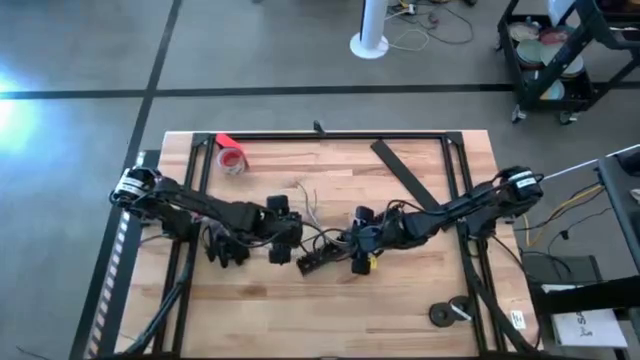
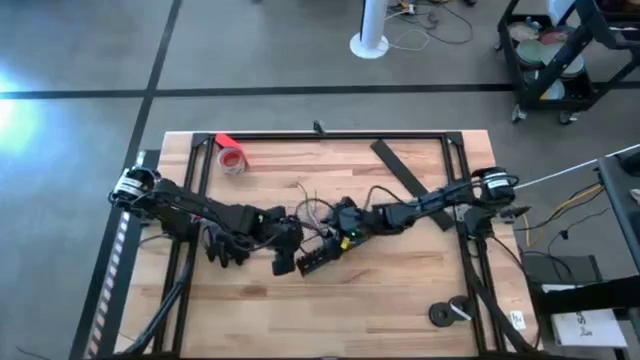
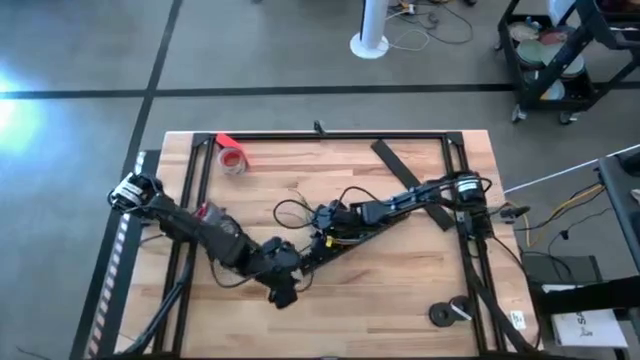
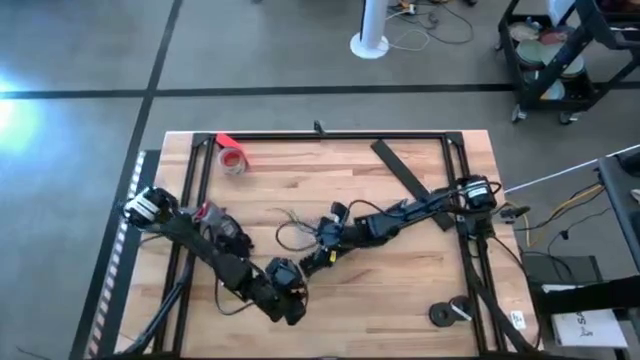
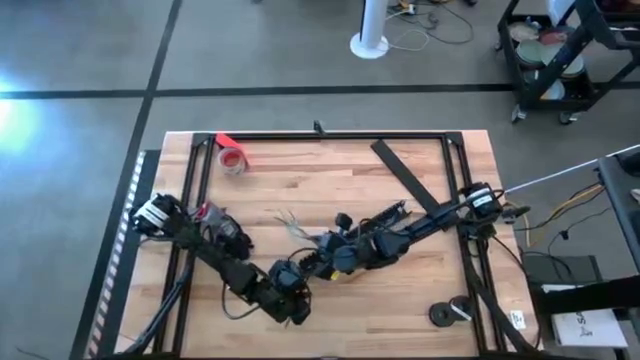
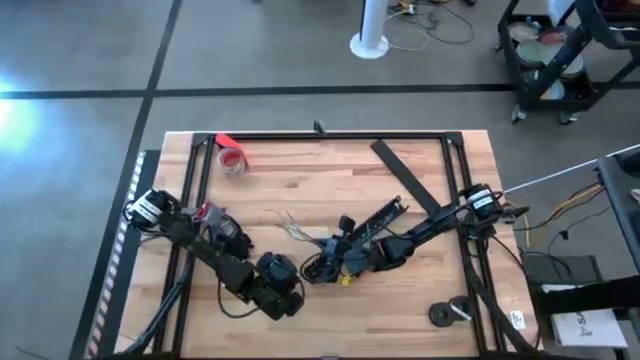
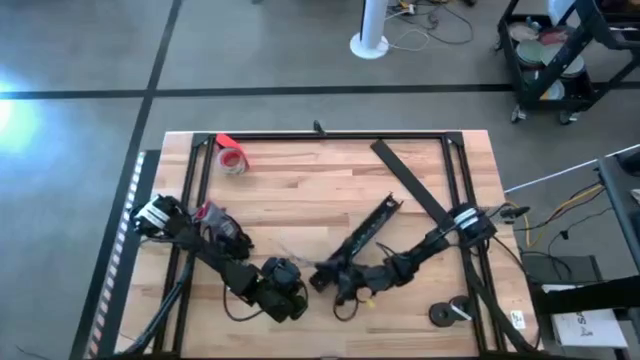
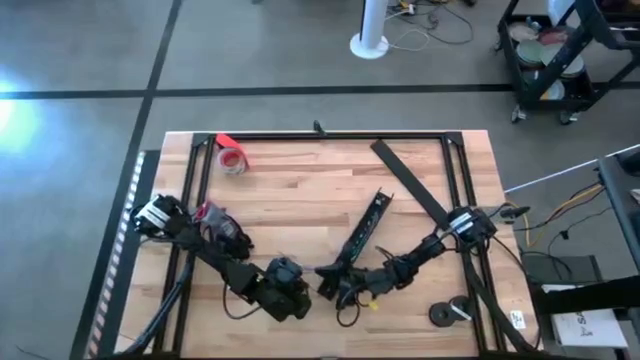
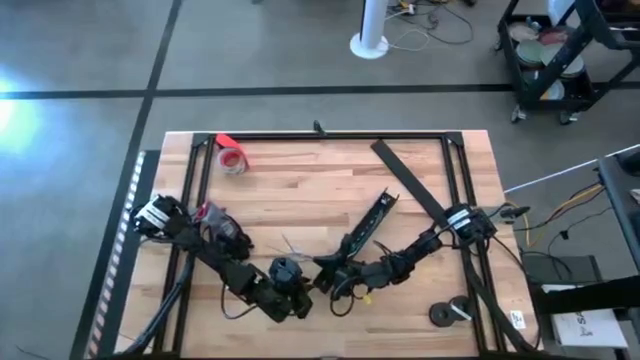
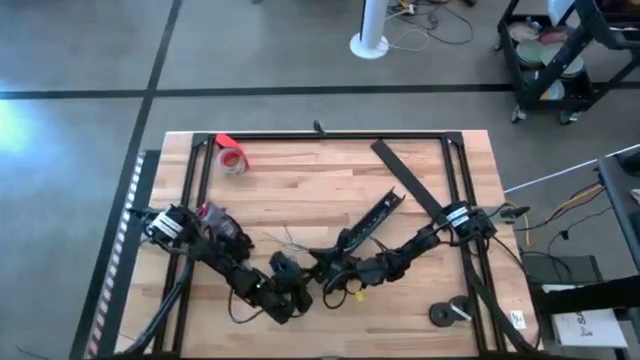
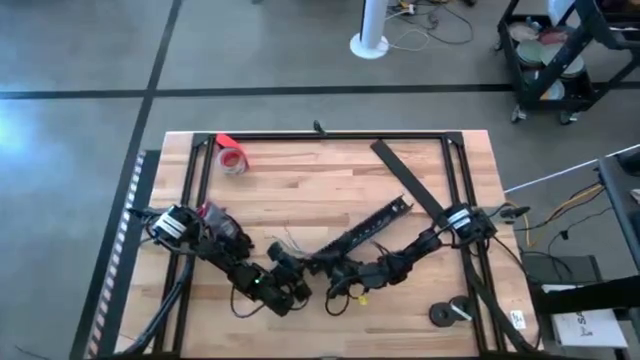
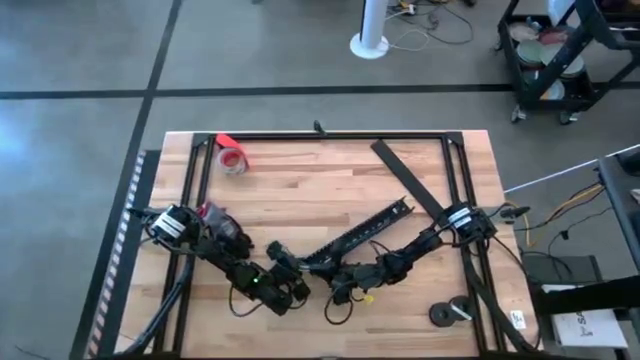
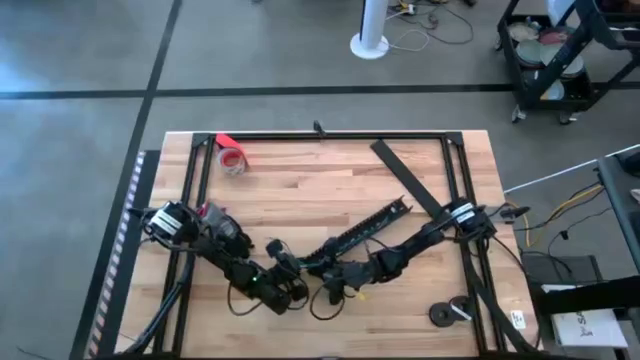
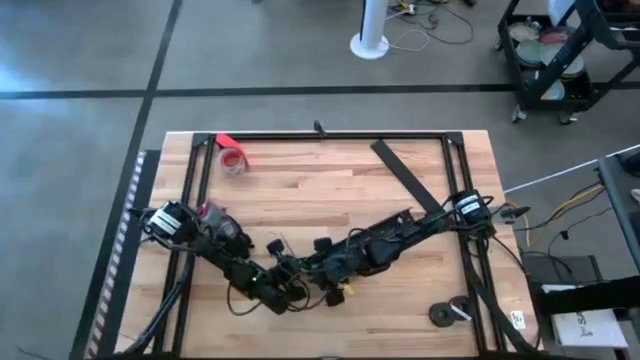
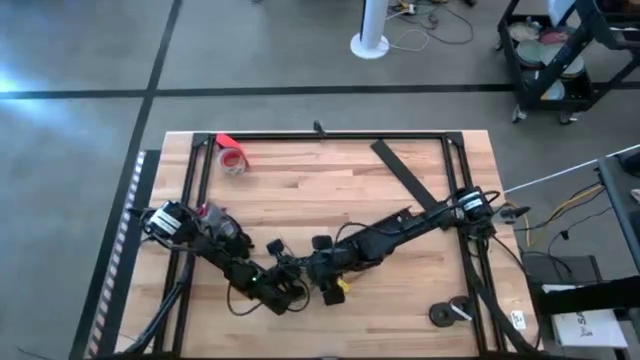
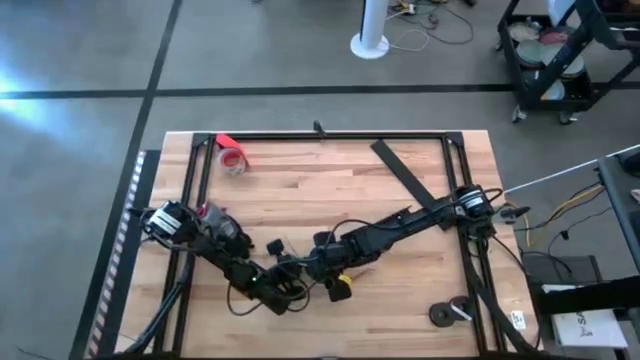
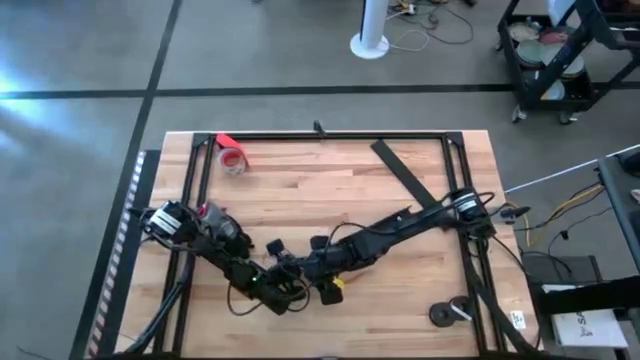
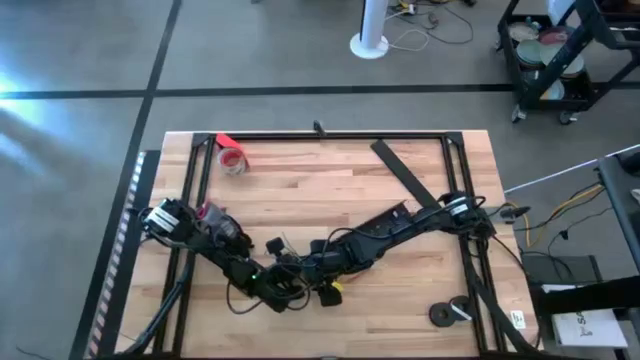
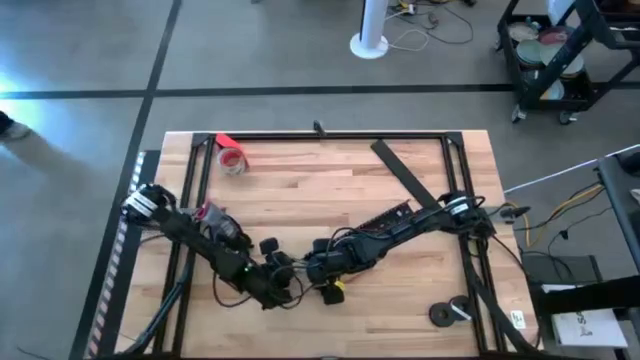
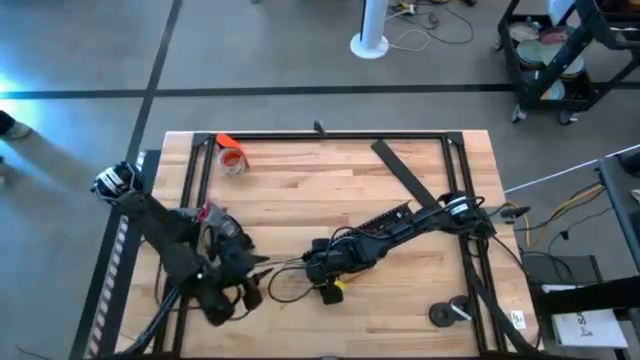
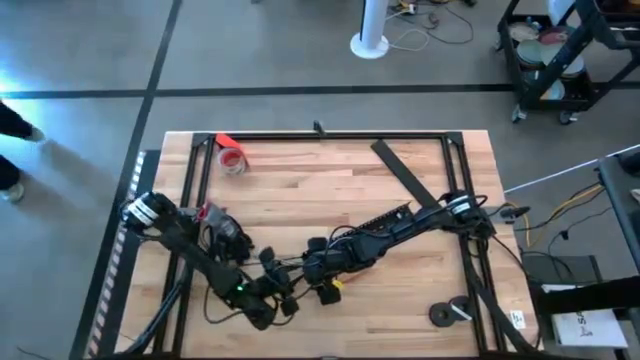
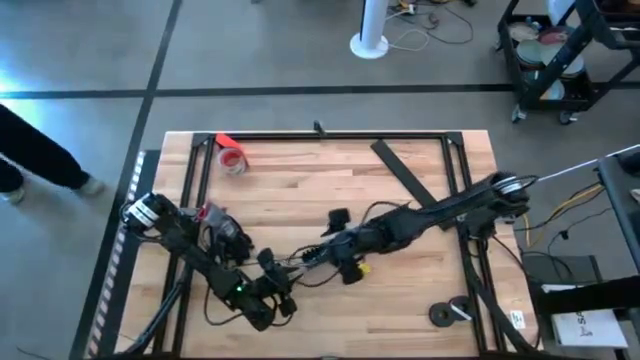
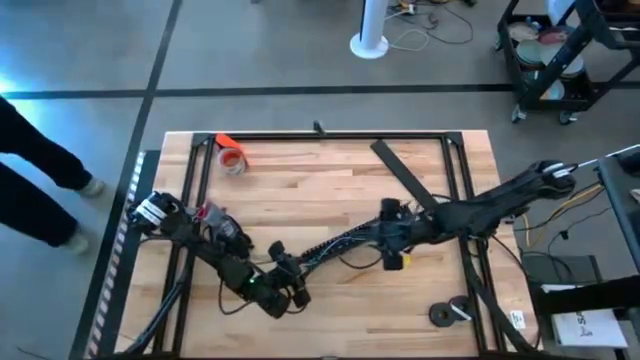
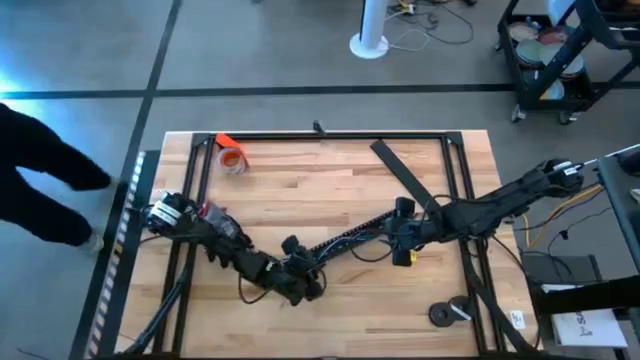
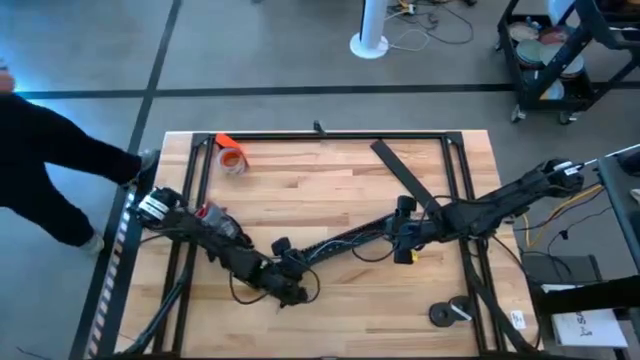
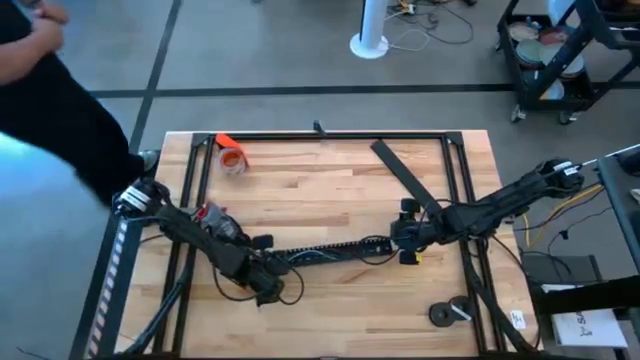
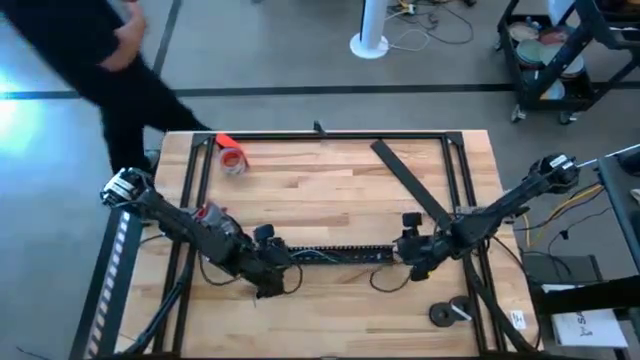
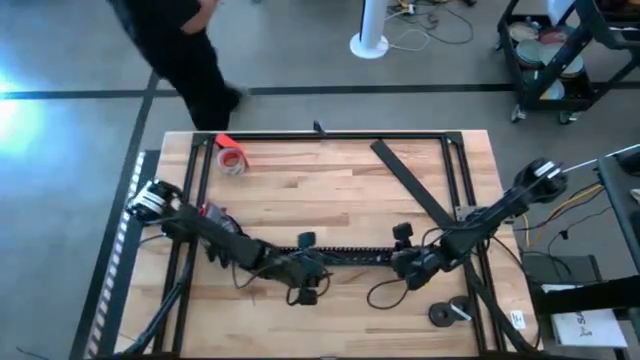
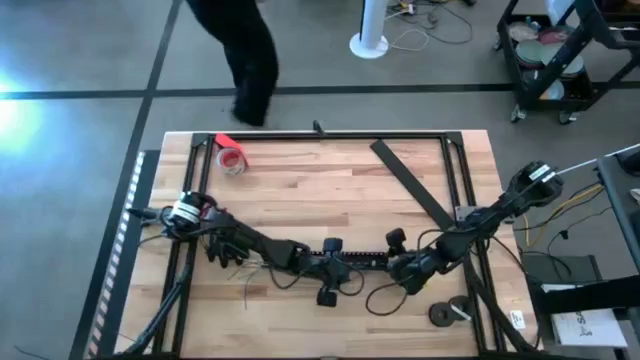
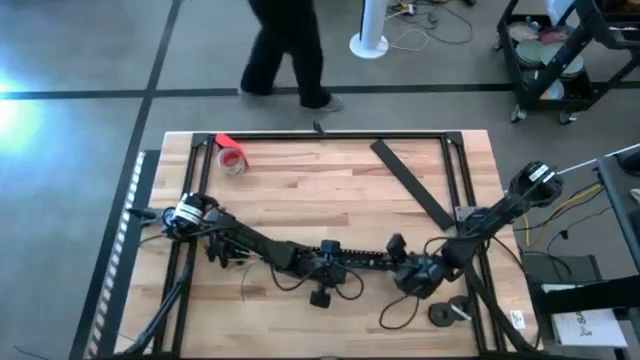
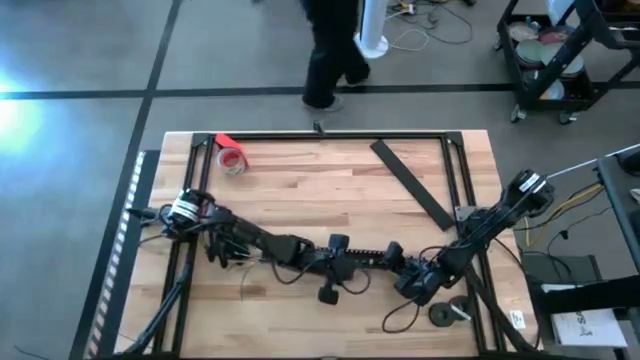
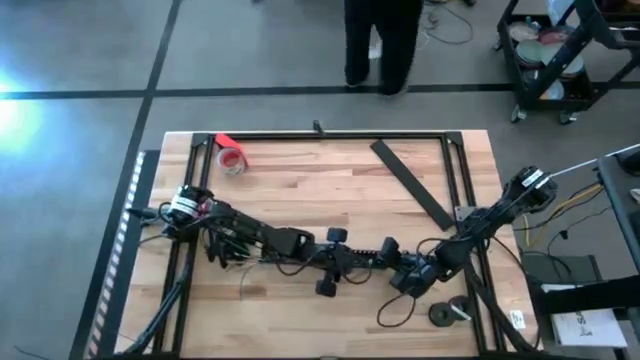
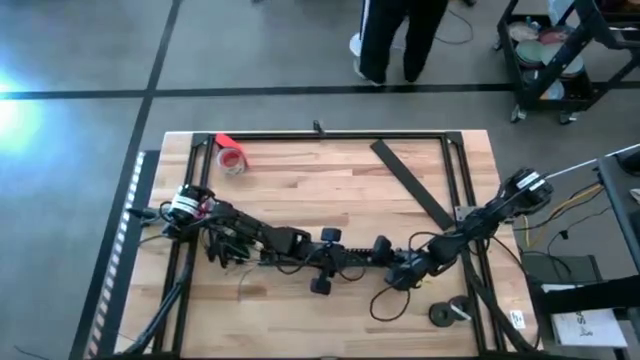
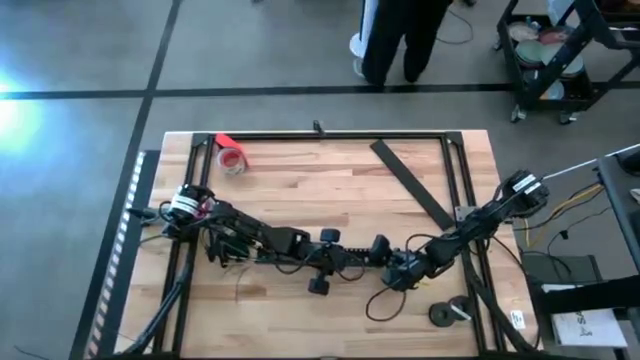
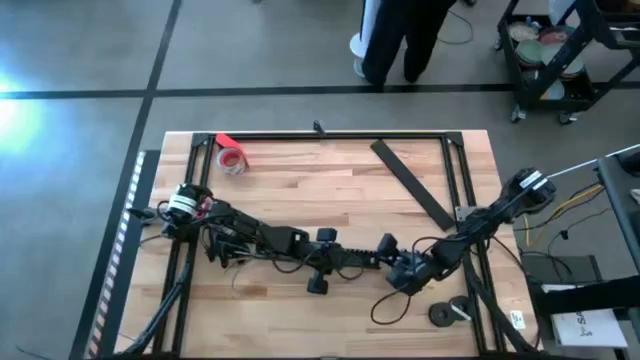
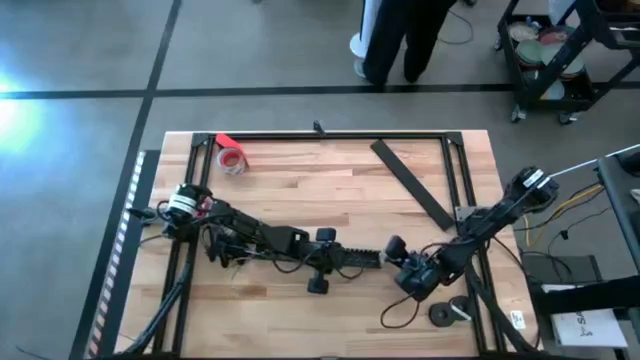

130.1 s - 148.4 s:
Task: Ziptie cables
Put the zip-tied cables into the black cable duct

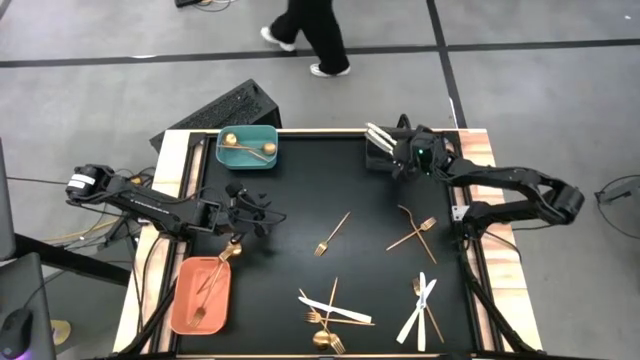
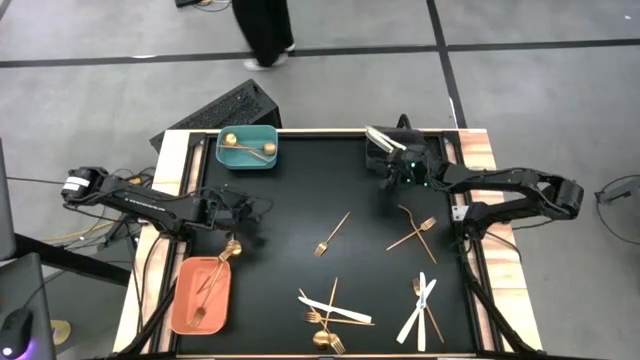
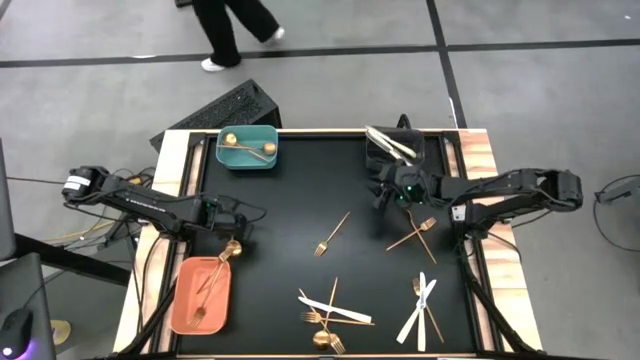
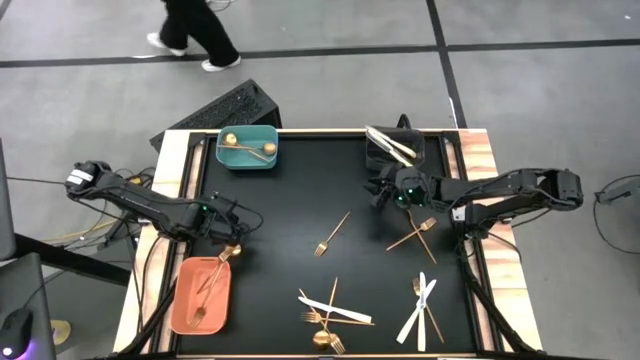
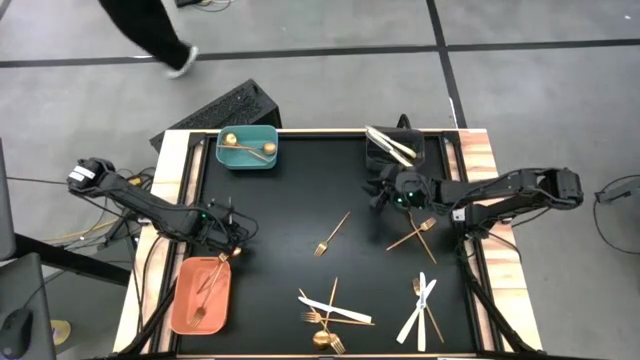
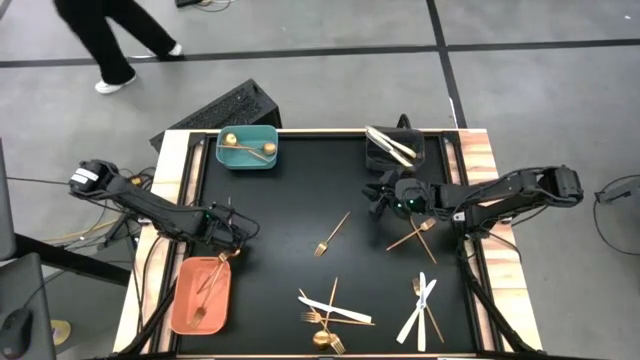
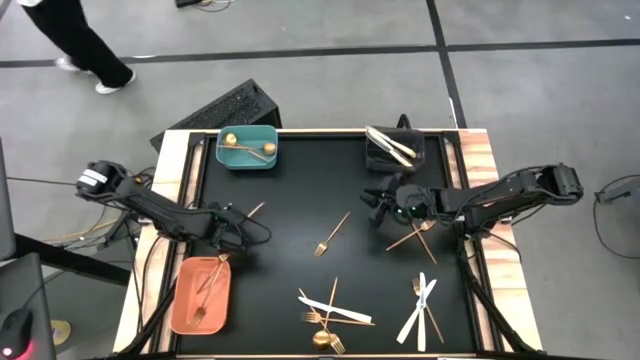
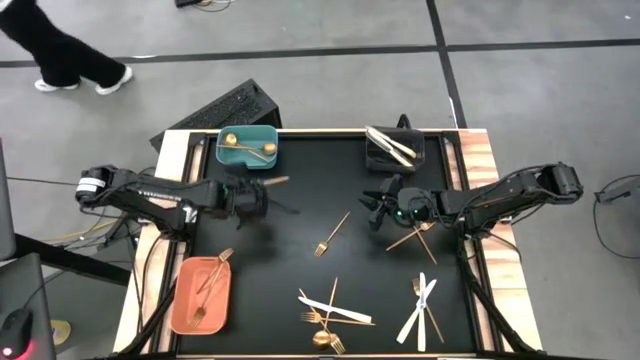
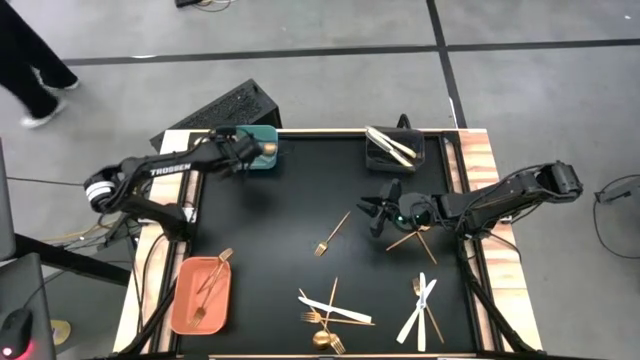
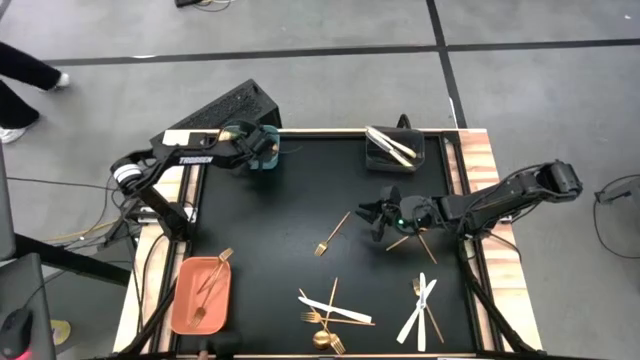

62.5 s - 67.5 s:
Task: Sort silverware by color (type)
Put the gold spoon into the green bin
